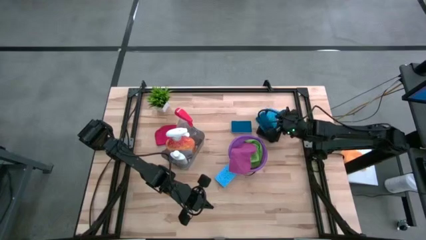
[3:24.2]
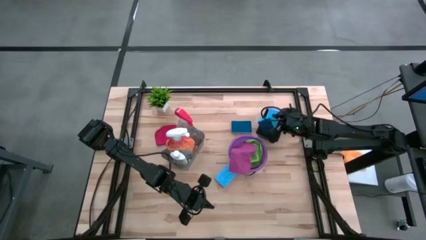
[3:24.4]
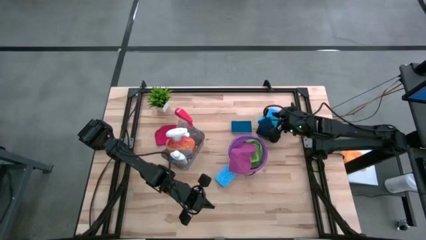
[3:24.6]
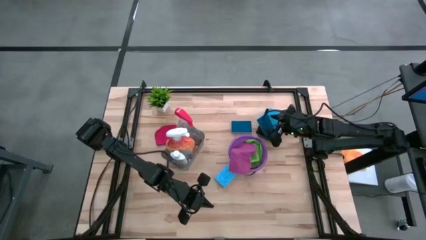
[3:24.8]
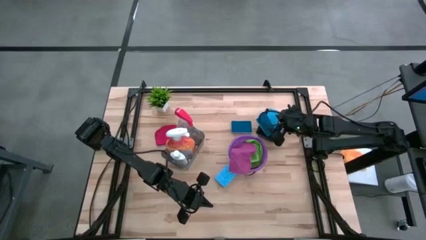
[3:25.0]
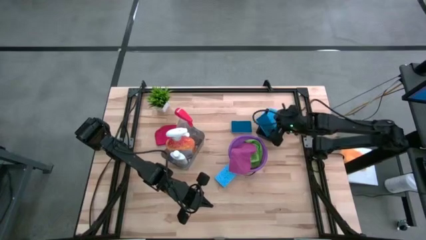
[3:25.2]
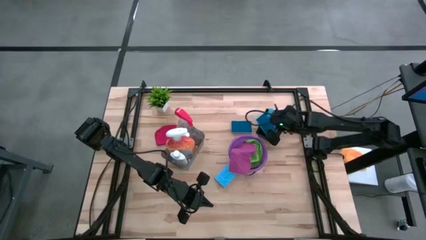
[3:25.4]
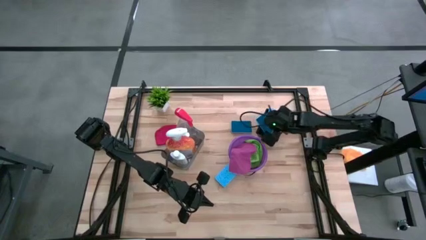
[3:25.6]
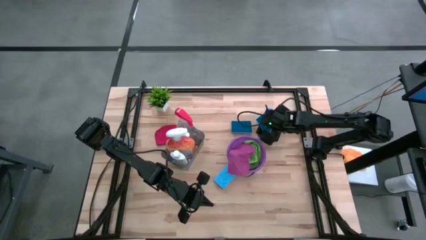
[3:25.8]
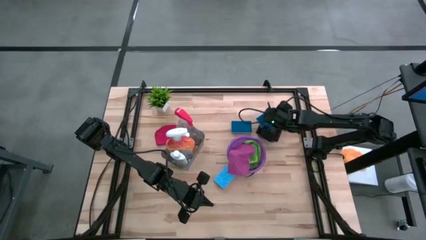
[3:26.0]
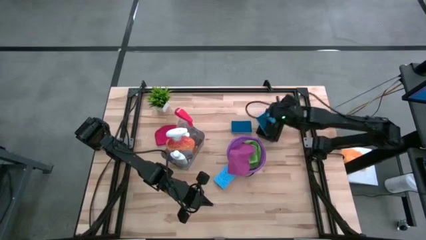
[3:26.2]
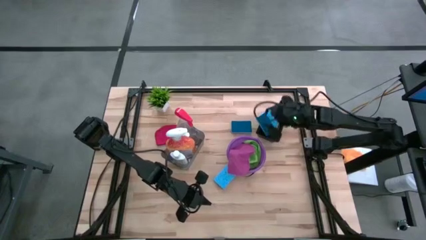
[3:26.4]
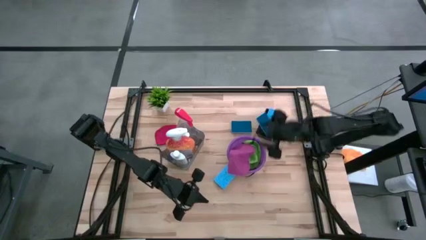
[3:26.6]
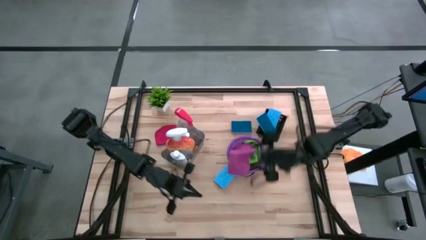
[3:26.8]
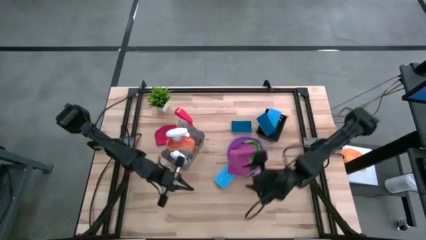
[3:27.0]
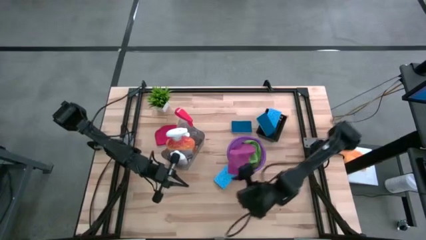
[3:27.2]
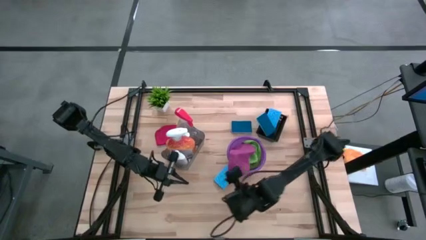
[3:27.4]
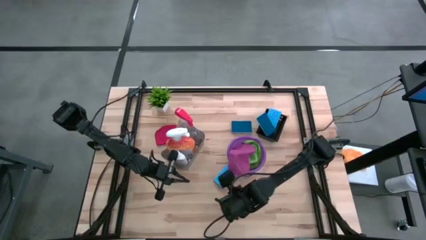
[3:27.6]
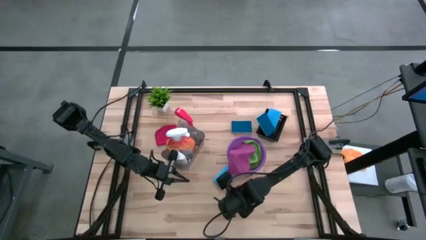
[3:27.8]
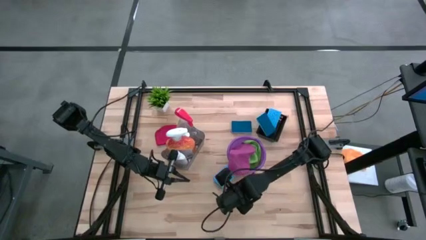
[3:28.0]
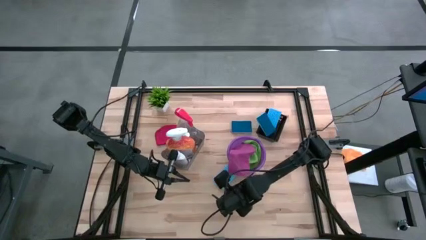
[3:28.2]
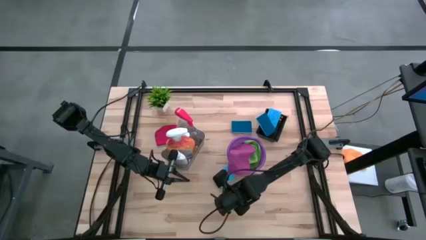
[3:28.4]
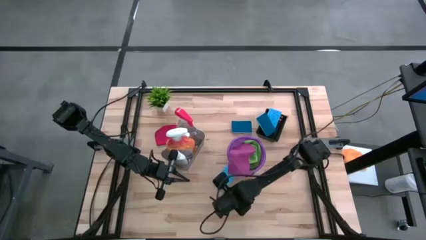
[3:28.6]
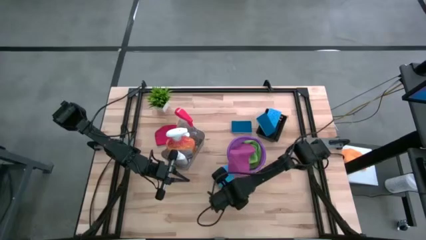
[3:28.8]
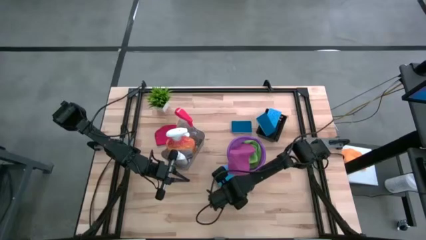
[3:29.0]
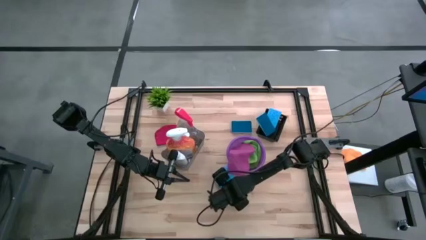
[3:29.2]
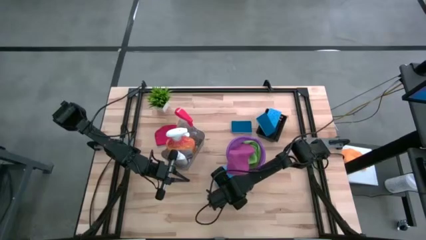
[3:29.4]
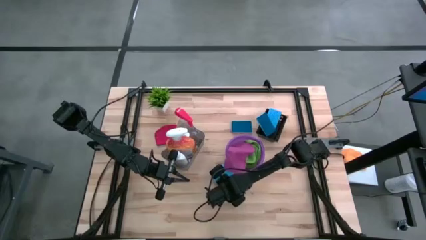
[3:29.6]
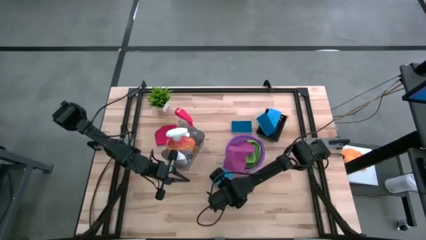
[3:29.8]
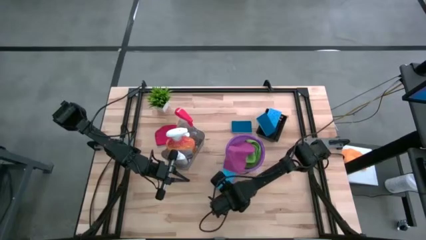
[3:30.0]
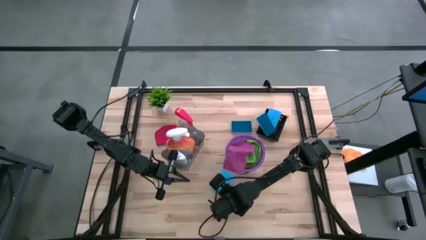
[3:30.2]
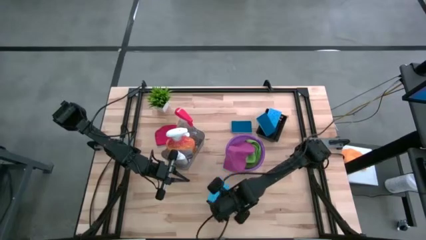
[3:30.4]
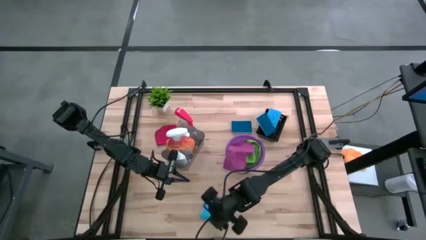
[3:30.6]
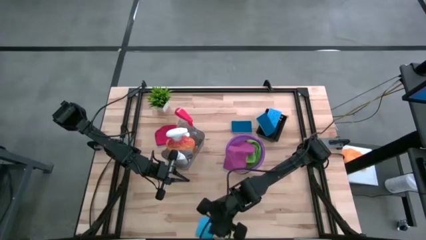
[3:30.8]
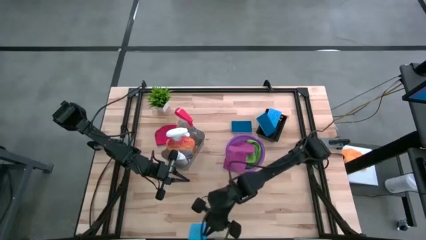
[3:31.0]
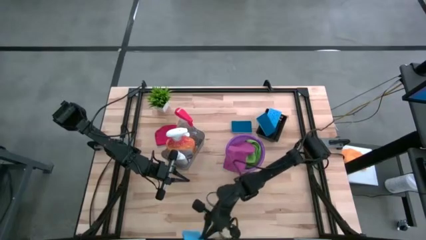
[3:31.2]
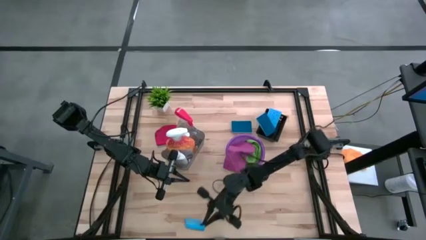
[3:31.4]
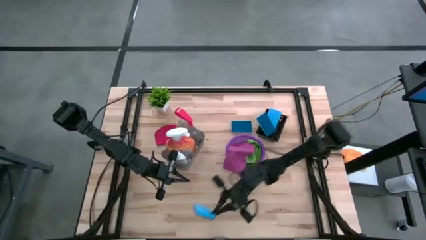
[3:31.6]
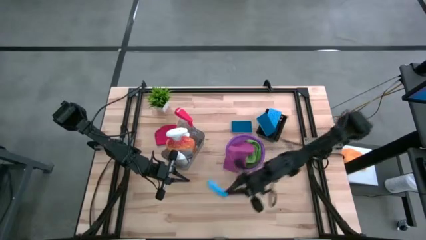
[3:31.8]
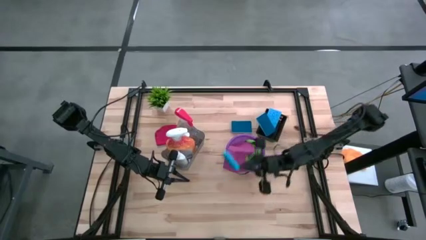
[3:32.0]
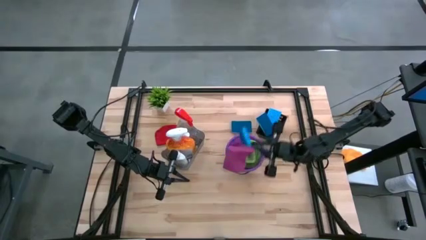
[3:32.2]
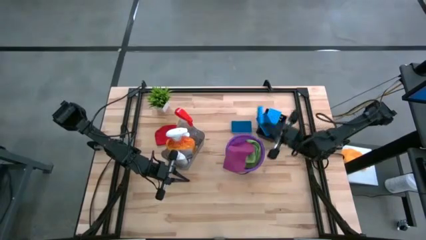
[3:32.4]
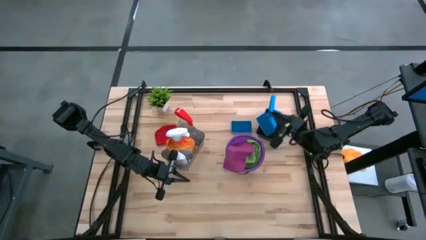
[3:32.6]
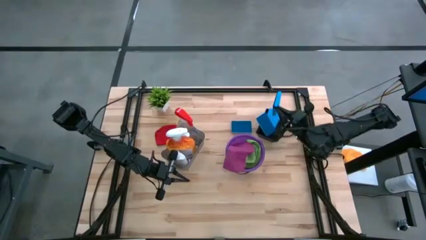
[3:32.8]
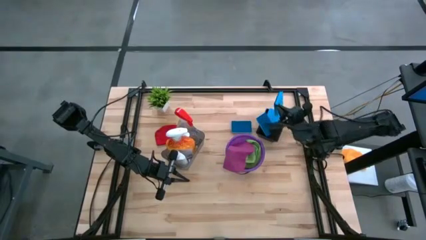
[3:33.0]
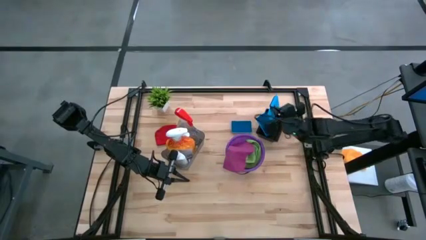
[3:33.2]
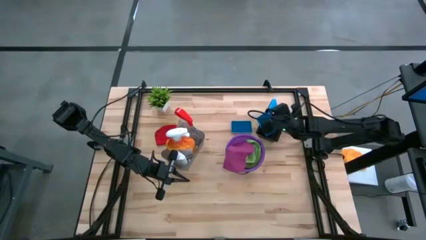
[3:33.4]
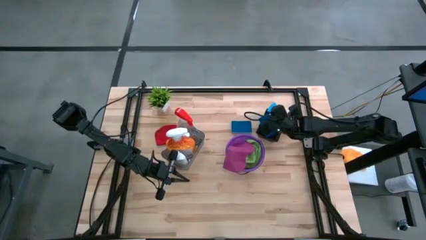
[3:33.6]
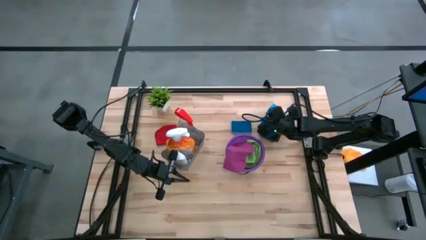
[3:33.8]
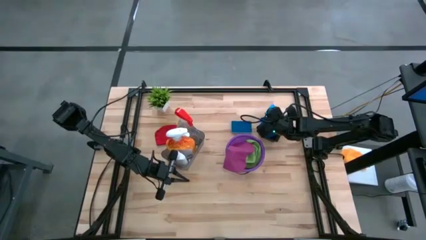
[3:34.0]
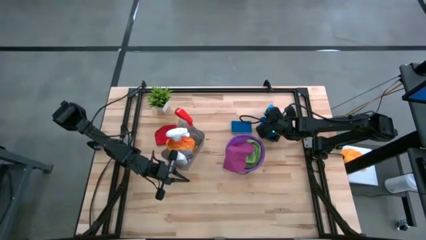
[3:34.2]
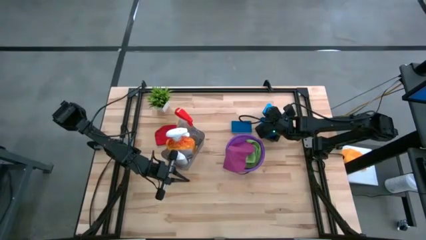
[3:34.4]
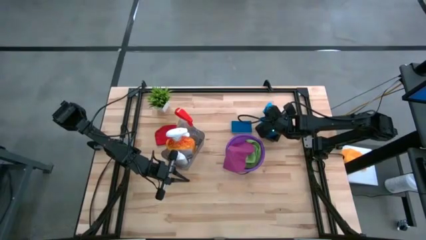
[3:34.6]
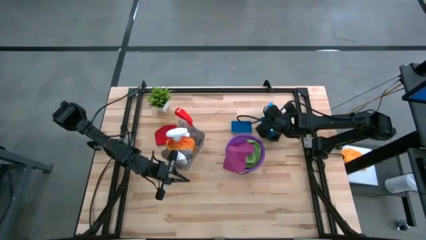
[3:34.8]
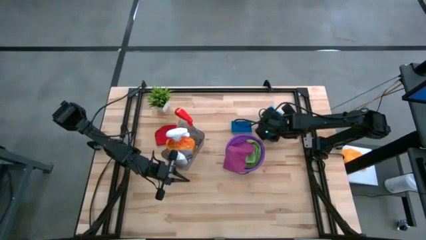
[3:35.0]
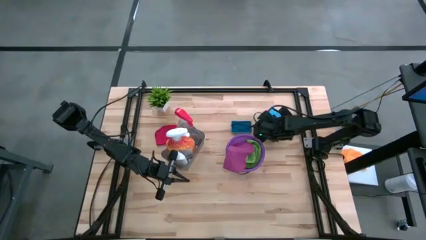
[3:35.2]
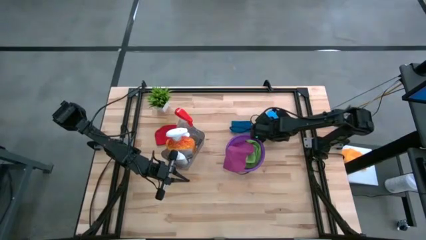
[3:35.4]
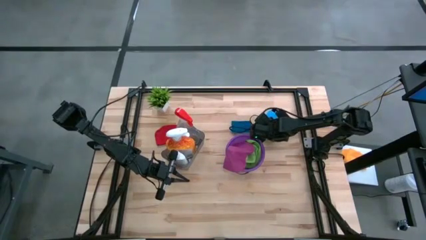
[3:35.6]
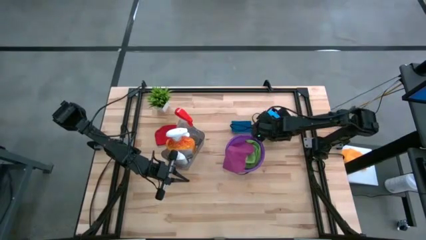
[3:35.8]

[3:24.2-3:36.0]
Task: Pick & Place Kitchen Items
Put the blue sponge wipe into the black bin

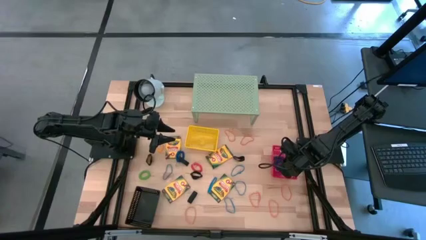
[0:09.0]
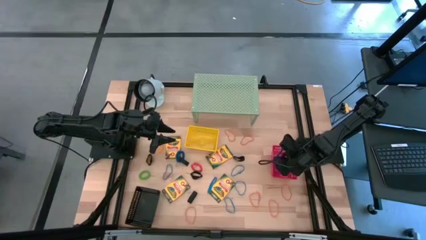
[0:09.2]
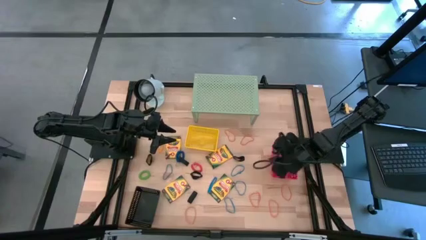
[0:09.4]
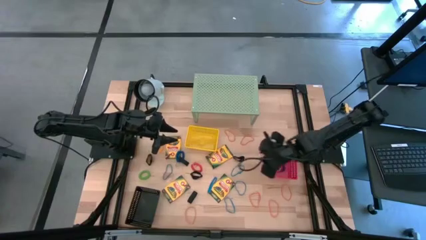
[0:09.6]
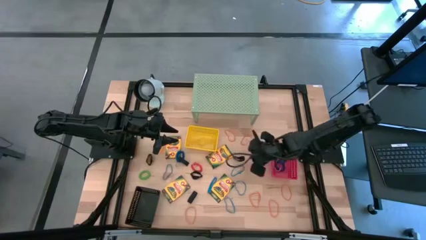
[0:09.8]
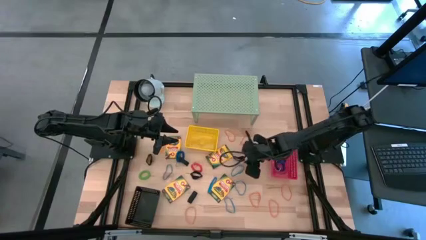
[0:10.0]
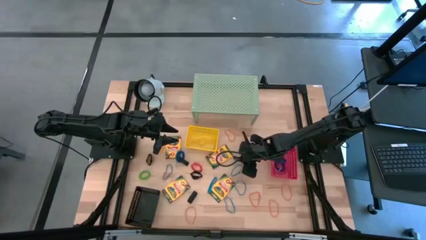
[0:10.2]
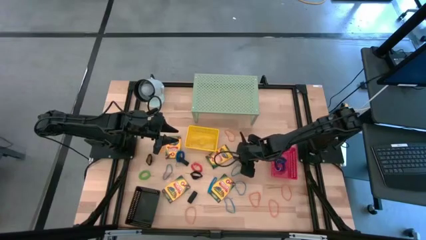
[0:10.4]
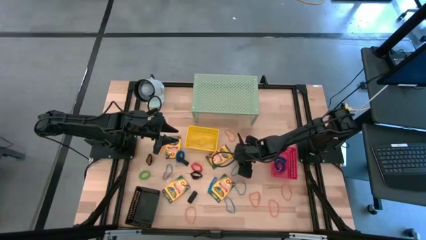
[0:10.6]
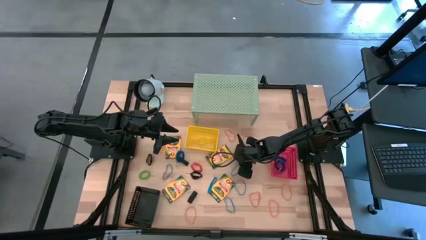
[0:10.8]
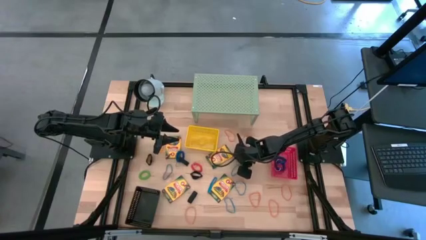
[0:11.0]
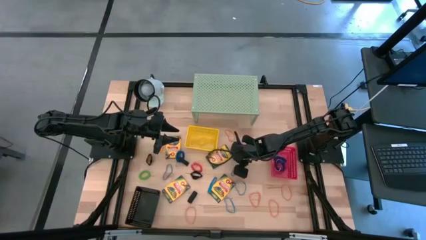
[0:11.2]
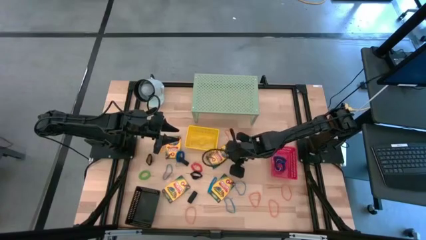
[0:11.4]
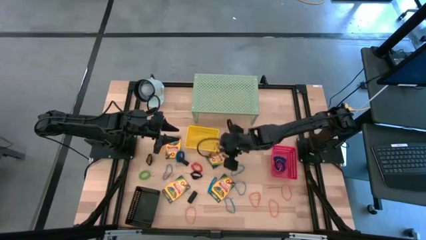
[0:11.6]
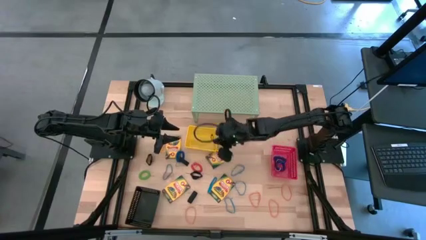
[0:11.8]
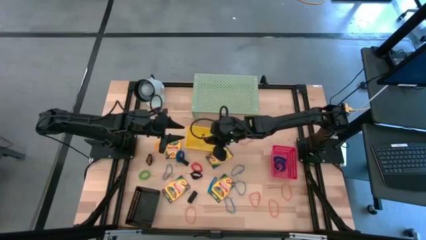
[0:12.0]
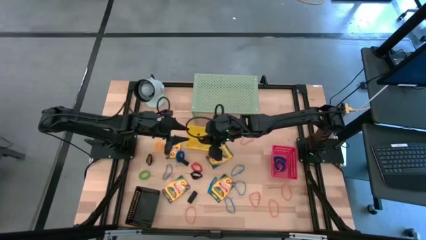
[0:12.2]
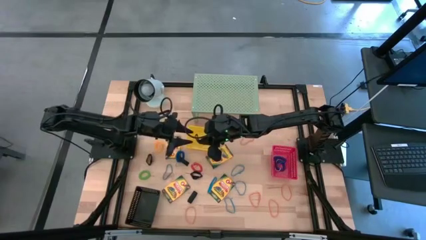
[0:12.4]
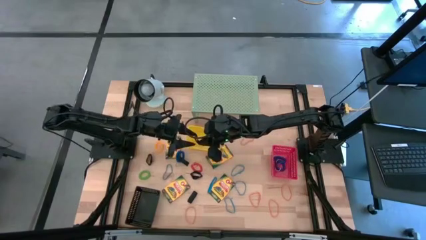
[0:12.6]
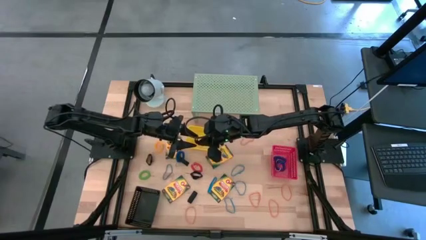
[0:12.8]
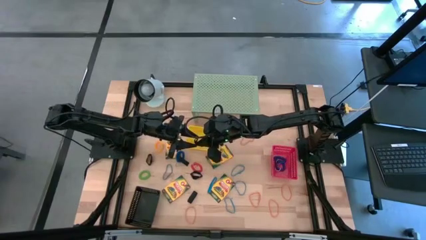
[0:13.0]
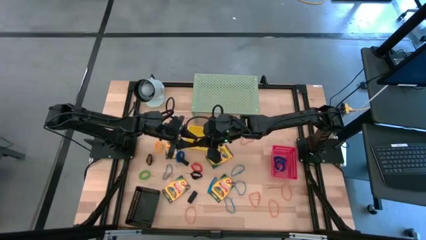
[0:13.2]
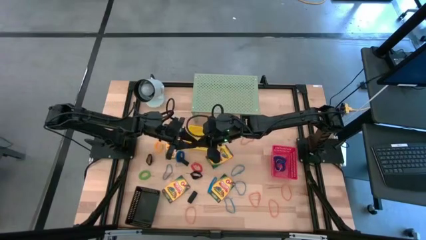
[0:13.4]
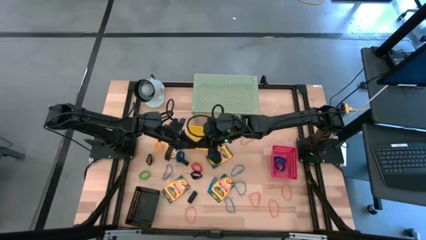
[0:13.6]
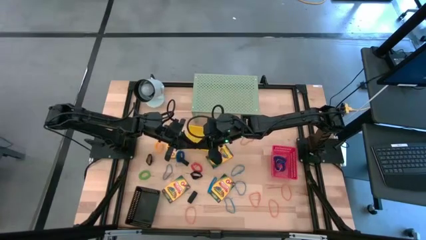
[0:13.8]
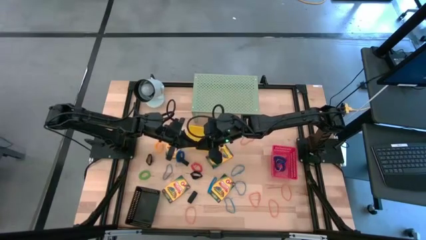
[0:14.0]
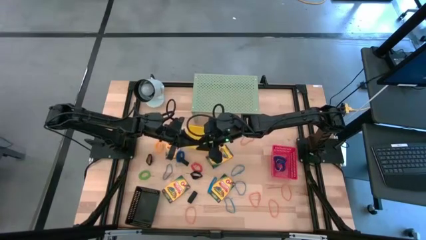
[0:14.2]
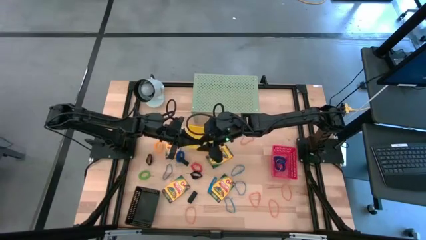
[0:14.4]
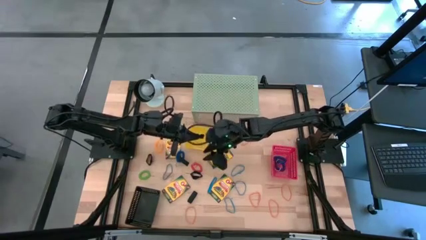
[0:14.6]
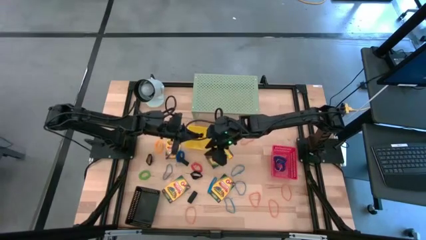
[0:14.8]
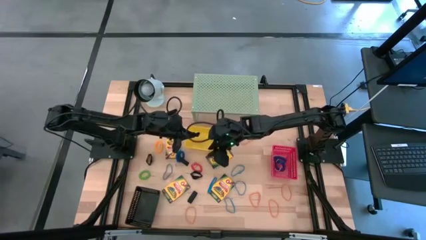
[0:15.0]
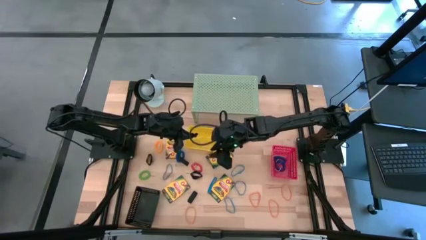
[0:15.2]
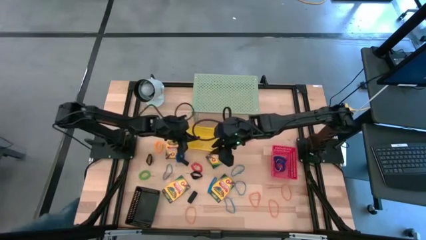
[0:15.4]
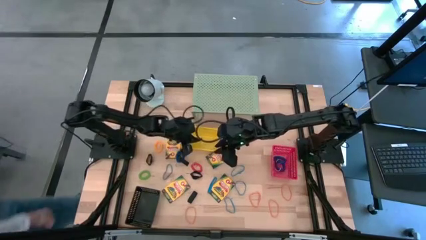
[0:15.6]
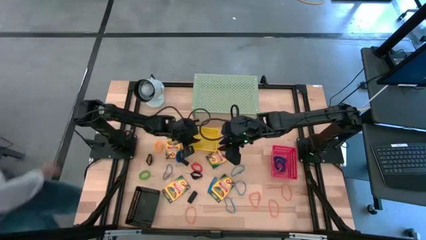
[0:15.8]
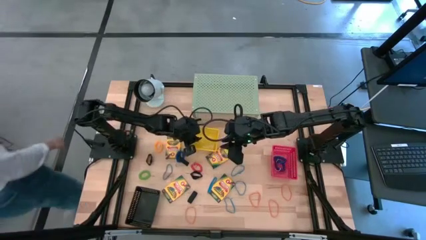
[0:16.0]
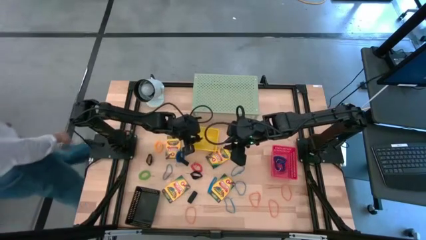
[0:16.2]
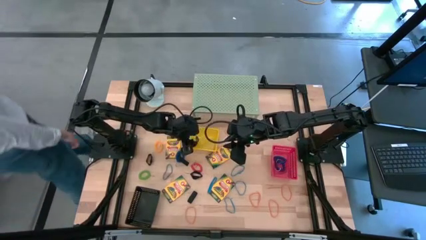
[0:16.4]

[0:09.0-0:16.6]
Task: Pick & Place Office Desk Supplies
Put the black rubber band into the yellow bin
